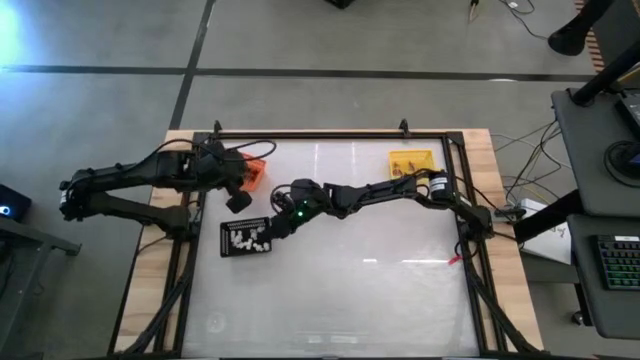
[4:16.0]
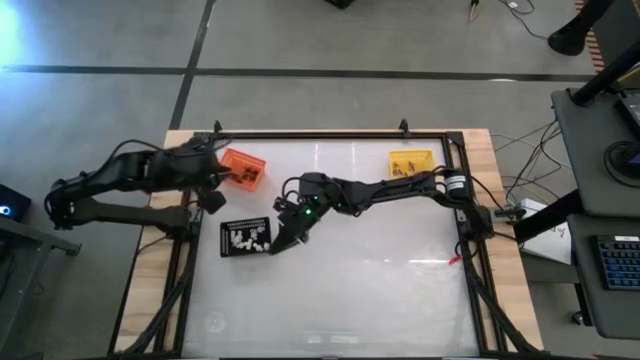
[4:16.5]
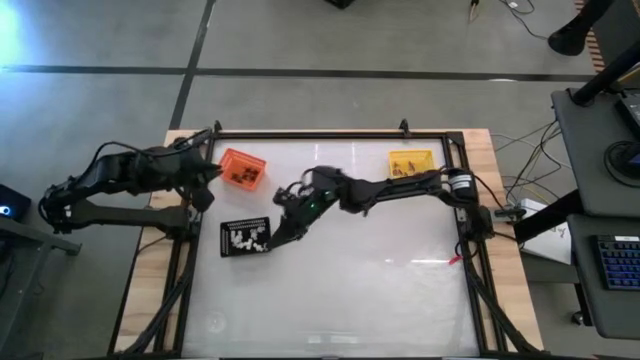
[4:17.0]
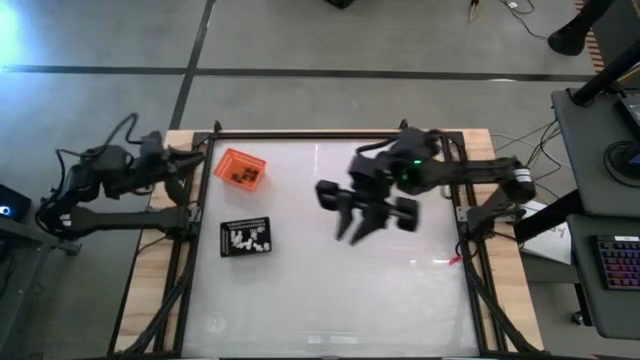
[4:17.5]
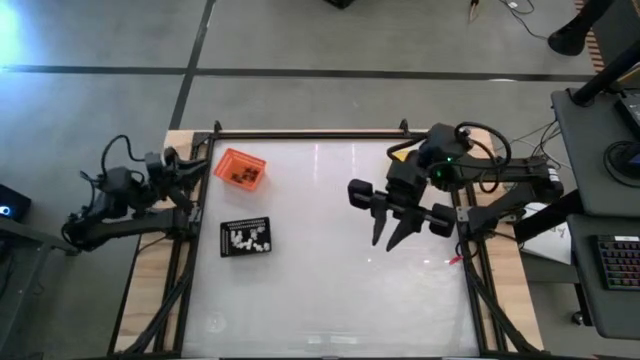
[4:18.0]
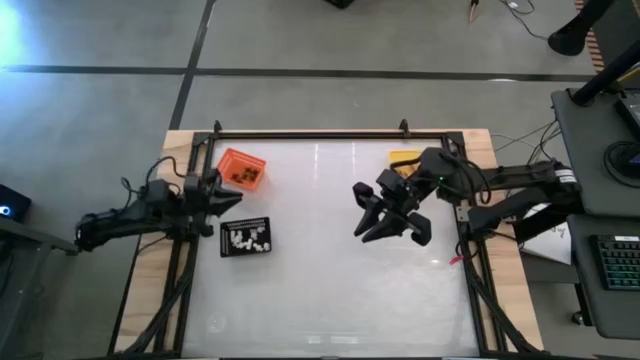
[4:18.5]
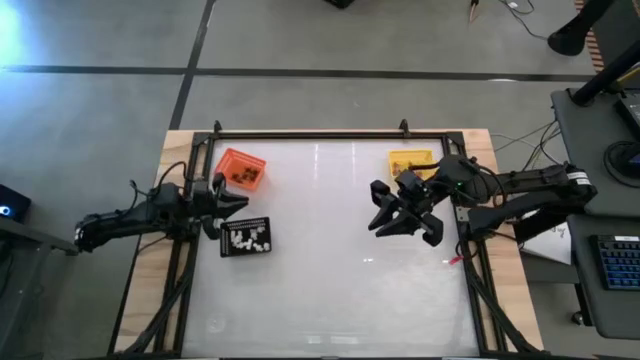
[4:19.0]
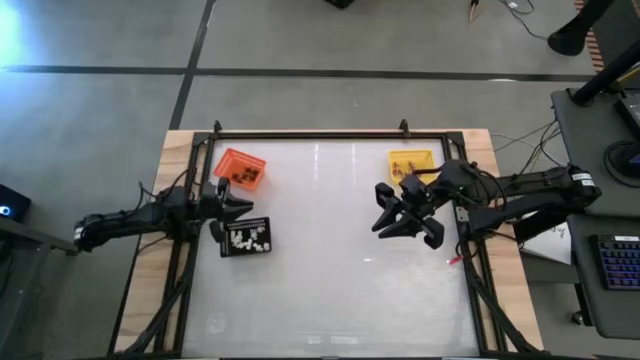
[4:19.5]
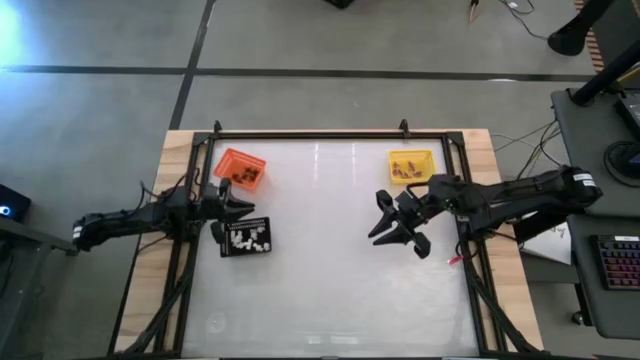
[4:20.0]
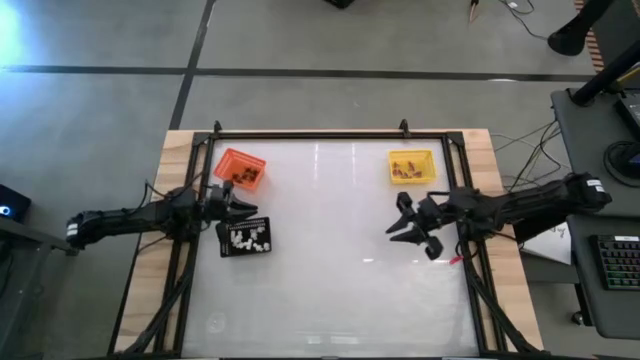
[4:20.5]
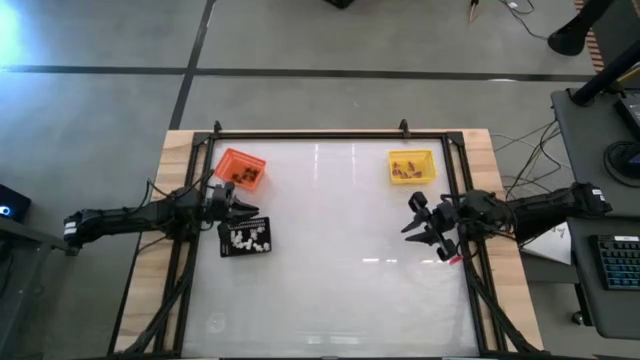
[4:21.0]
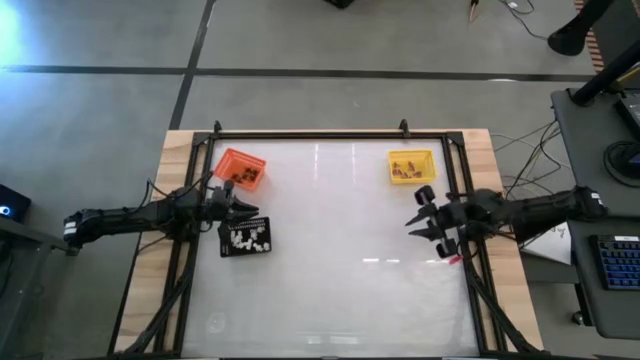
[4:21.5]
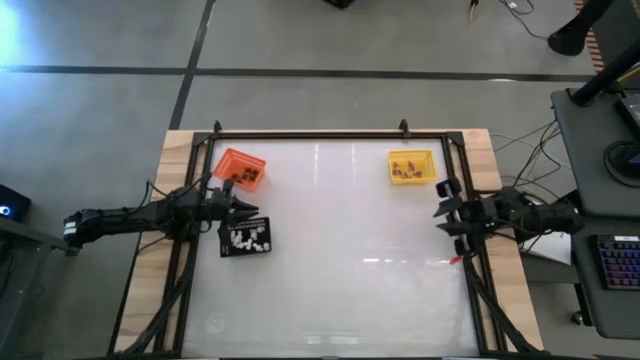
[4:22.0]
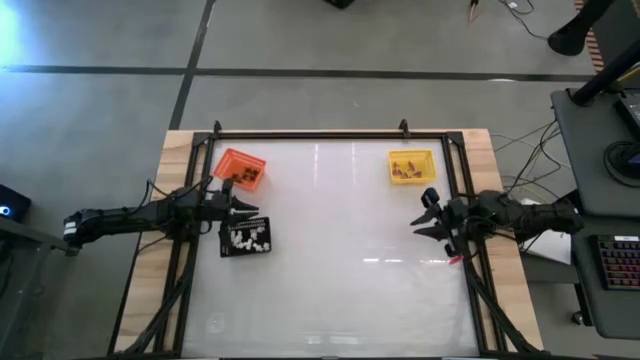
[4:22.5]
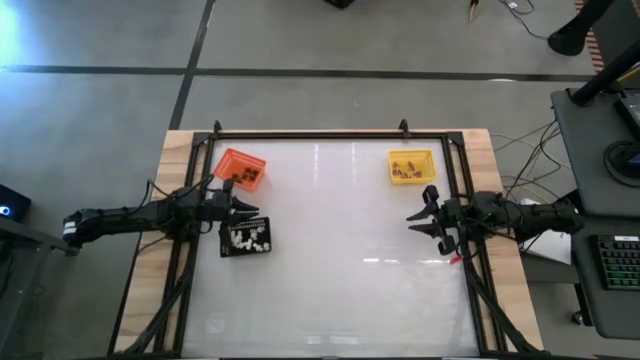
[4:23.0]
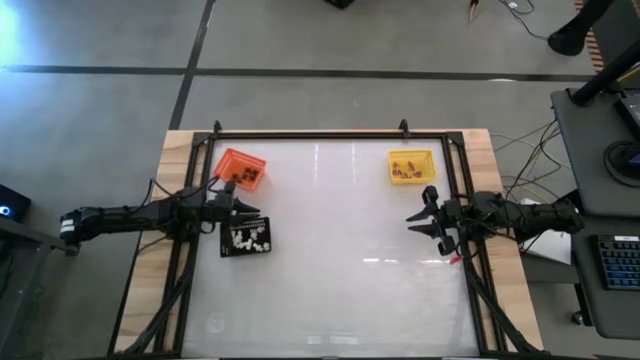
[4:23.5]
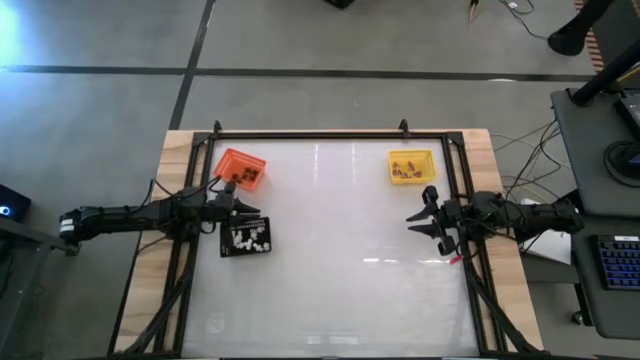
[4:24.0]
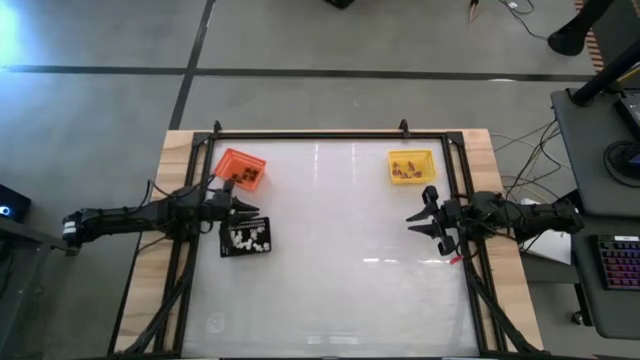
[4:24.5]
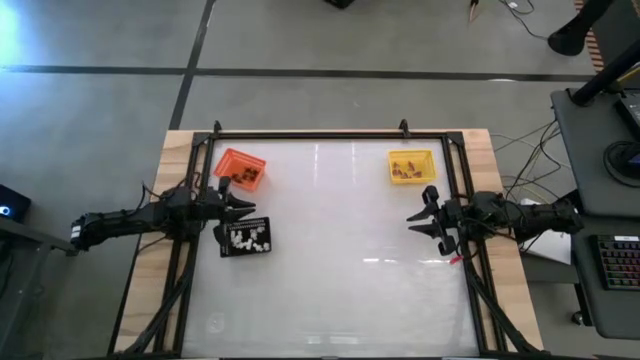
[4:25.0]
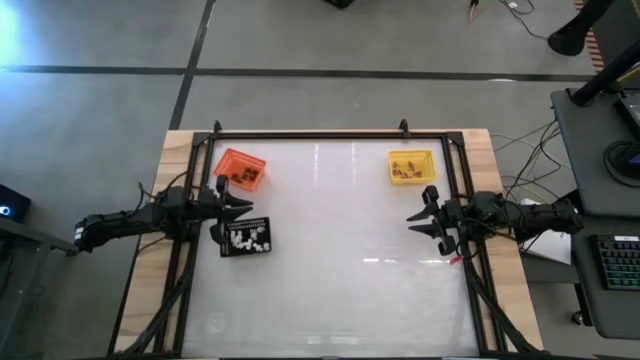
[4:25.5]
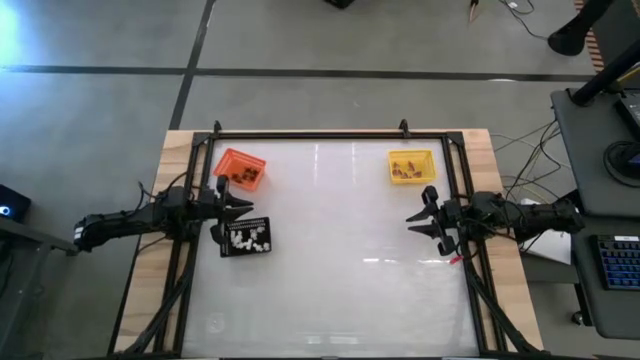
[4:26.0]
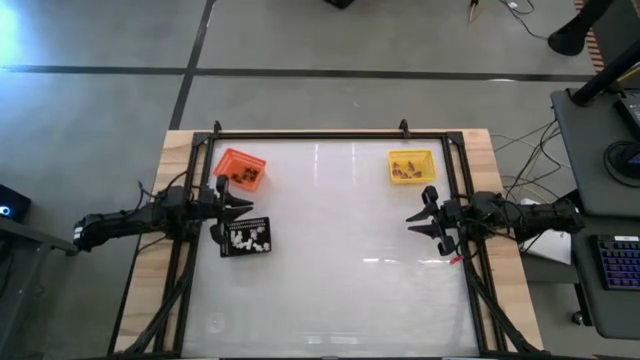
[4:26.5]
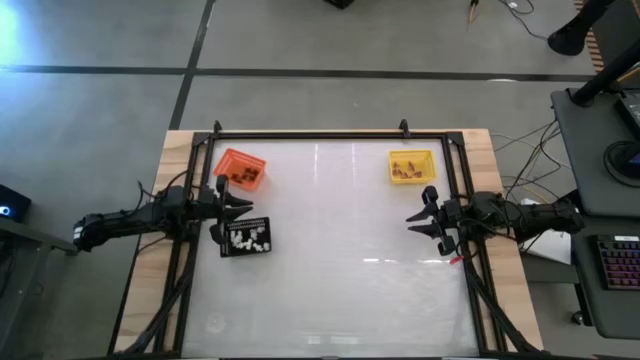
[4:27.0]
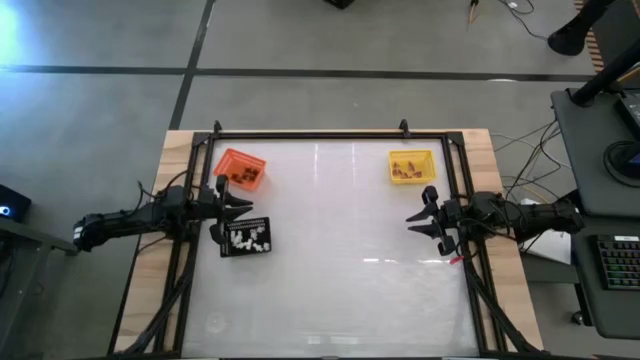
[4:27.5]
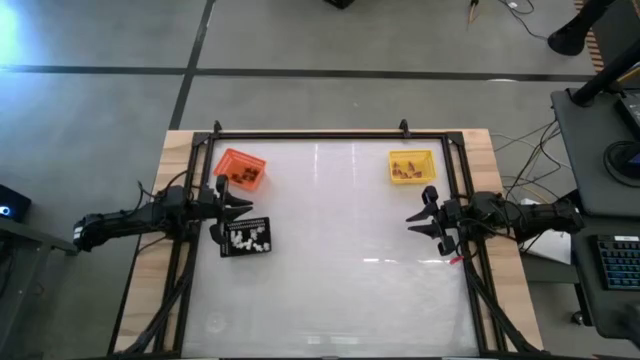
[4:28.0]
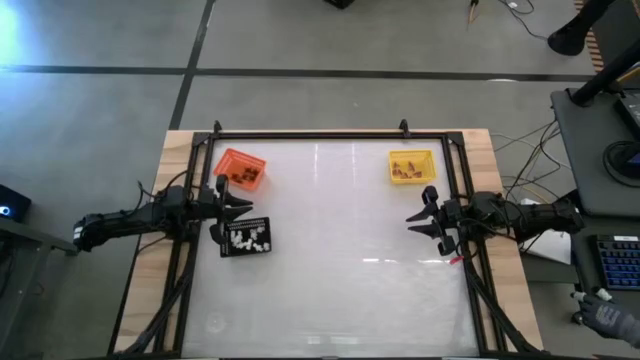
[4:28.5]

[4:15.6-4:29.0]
Task: Sort Halloween decoration
Return to Home Position
